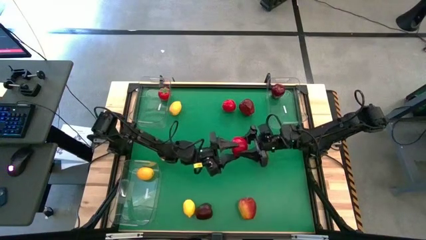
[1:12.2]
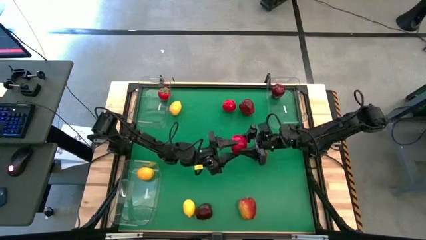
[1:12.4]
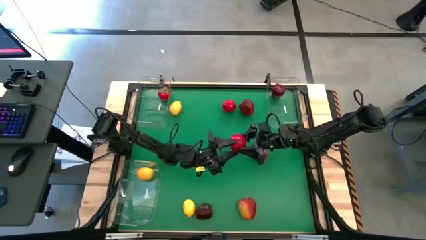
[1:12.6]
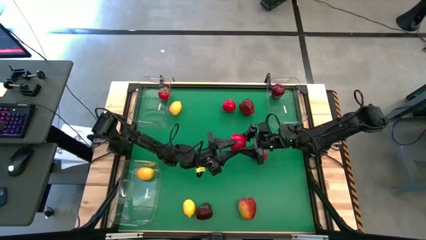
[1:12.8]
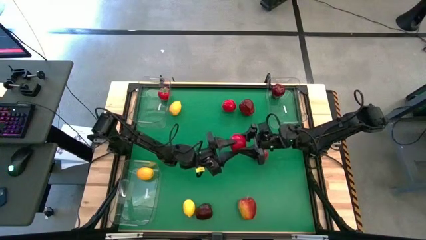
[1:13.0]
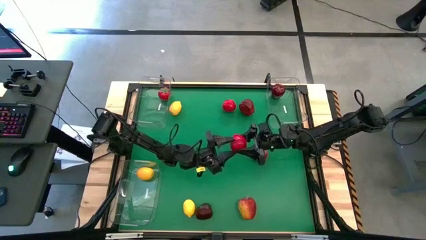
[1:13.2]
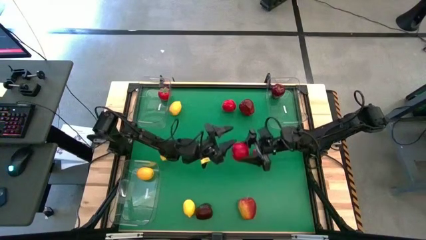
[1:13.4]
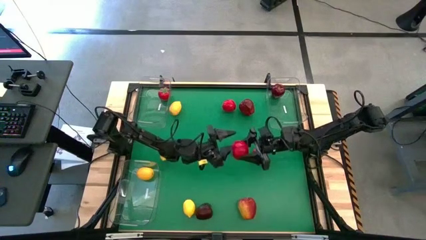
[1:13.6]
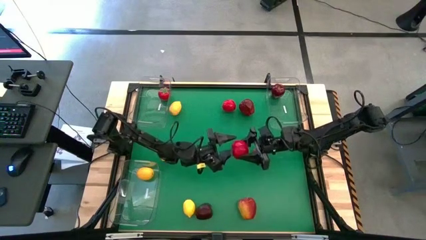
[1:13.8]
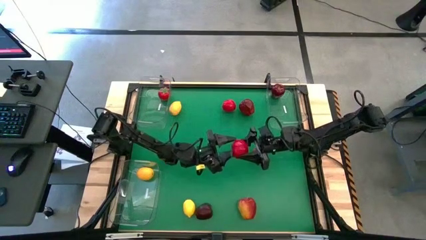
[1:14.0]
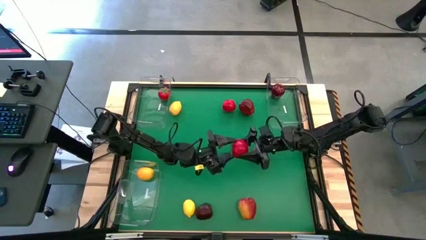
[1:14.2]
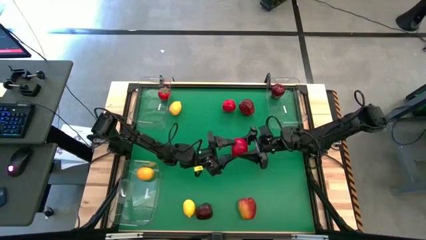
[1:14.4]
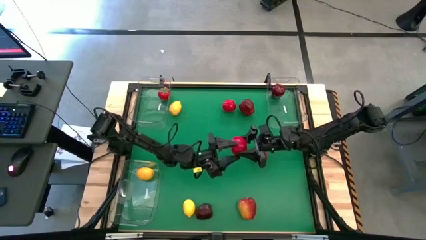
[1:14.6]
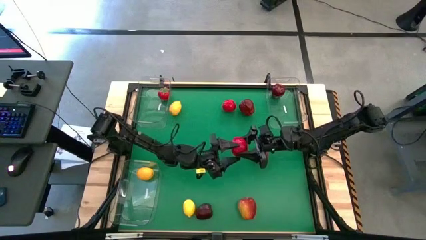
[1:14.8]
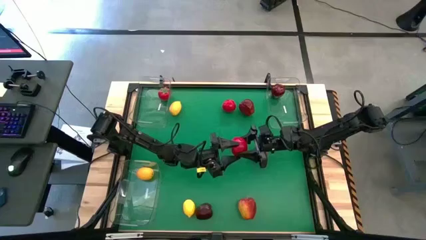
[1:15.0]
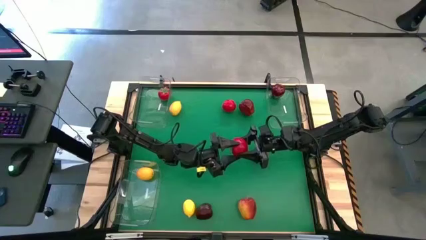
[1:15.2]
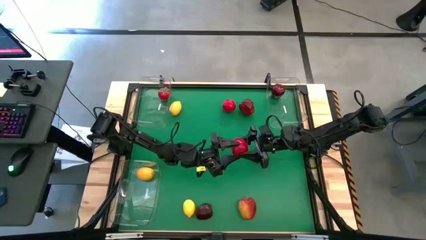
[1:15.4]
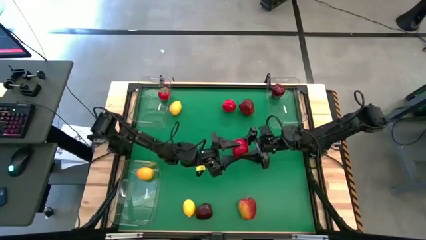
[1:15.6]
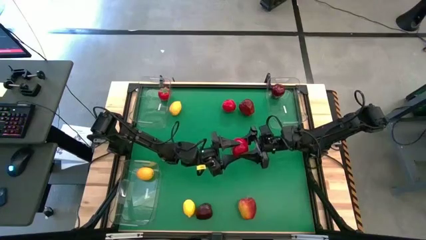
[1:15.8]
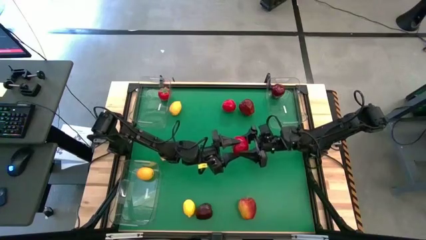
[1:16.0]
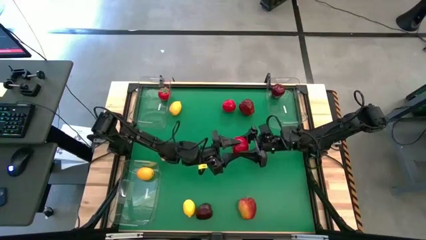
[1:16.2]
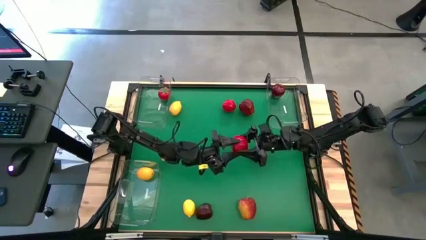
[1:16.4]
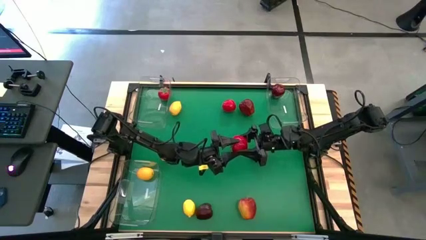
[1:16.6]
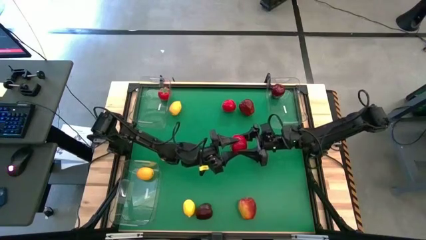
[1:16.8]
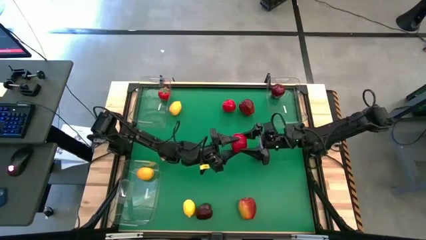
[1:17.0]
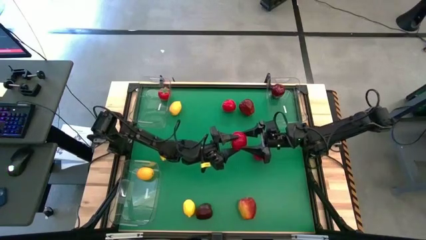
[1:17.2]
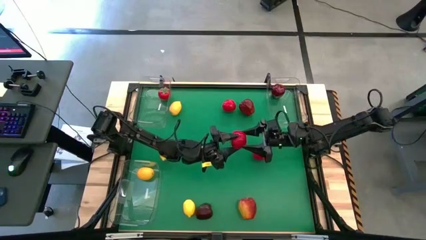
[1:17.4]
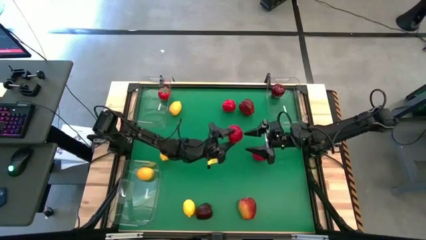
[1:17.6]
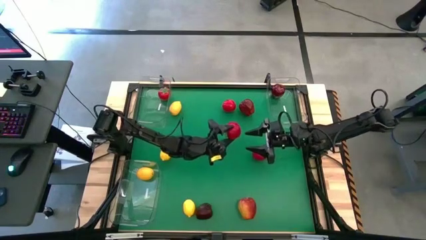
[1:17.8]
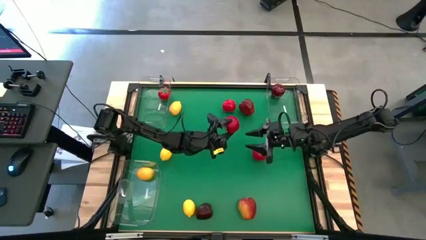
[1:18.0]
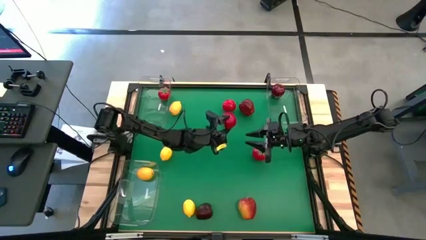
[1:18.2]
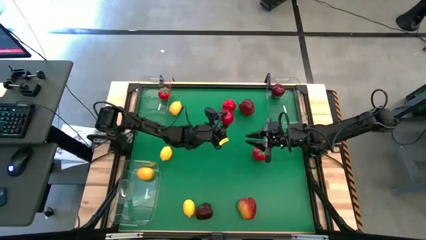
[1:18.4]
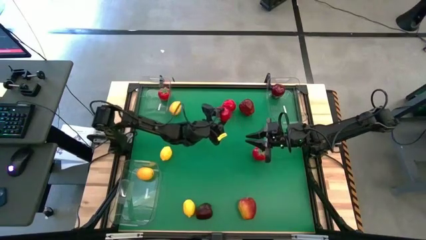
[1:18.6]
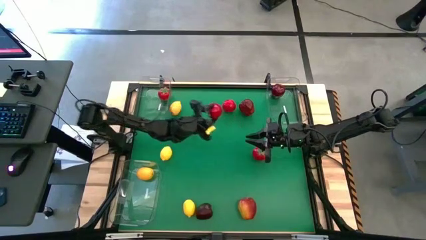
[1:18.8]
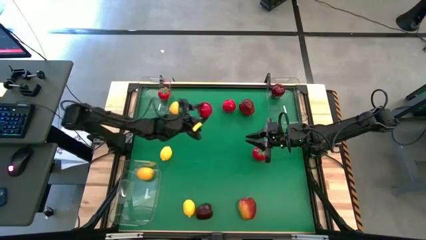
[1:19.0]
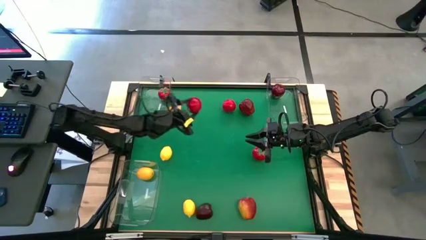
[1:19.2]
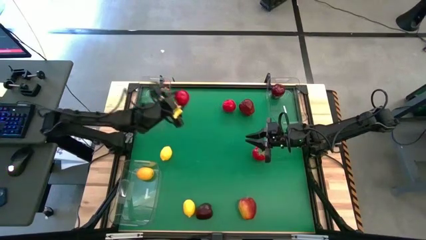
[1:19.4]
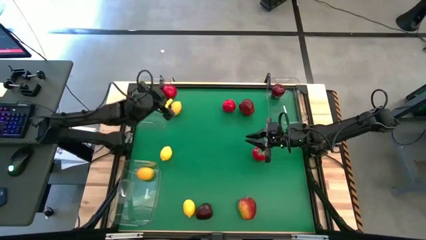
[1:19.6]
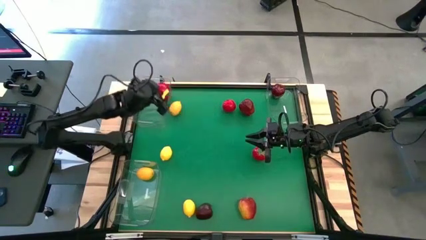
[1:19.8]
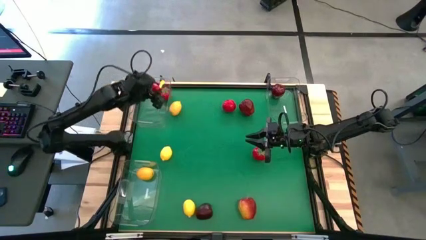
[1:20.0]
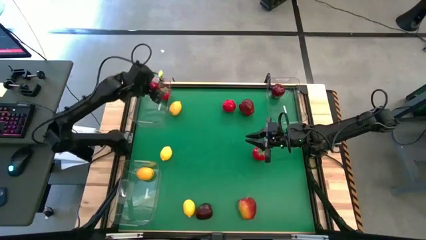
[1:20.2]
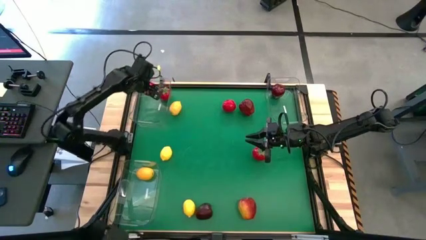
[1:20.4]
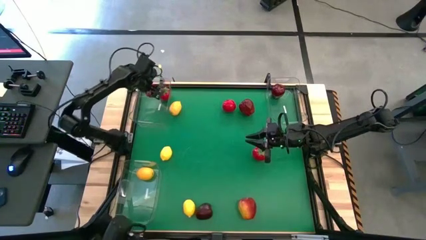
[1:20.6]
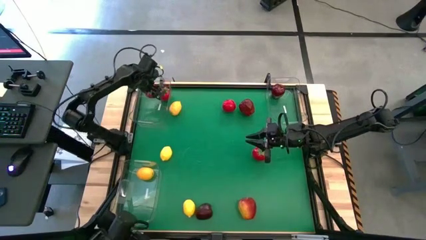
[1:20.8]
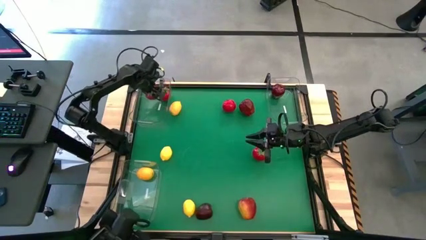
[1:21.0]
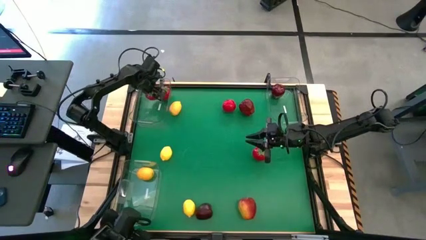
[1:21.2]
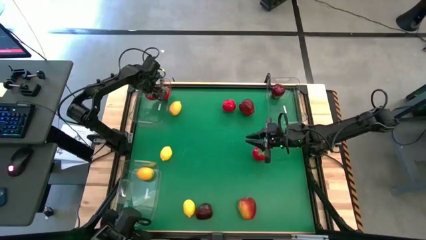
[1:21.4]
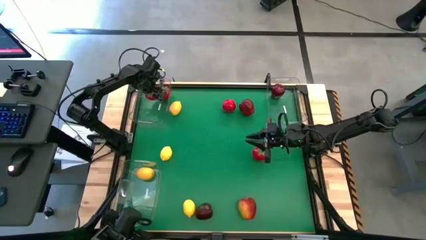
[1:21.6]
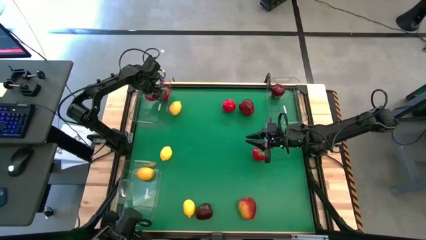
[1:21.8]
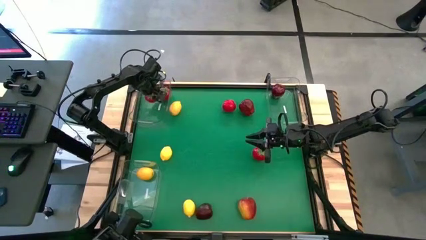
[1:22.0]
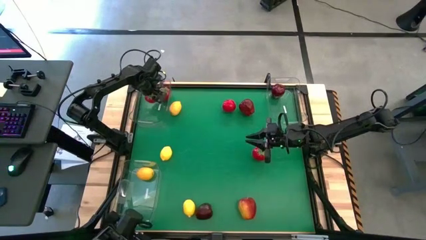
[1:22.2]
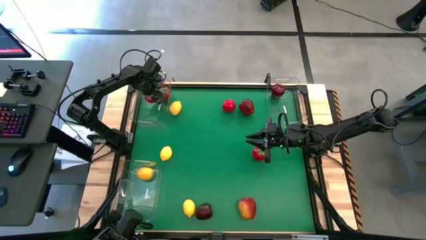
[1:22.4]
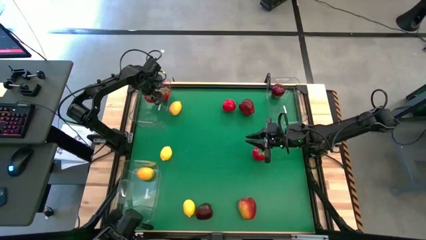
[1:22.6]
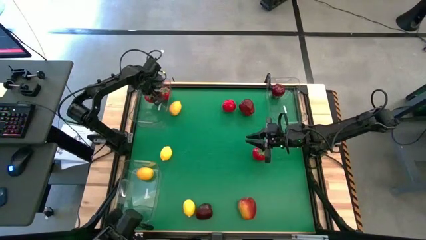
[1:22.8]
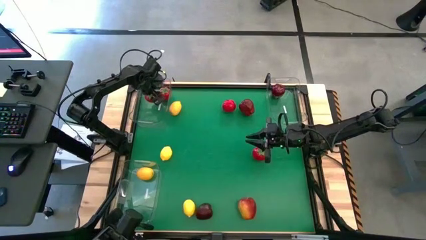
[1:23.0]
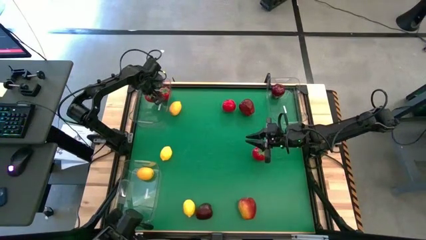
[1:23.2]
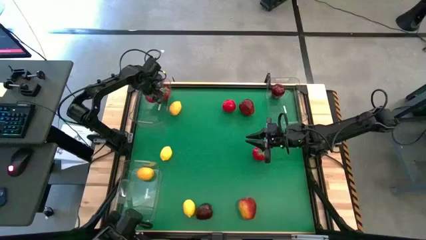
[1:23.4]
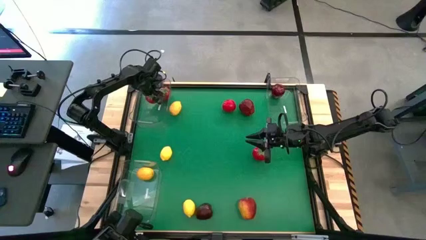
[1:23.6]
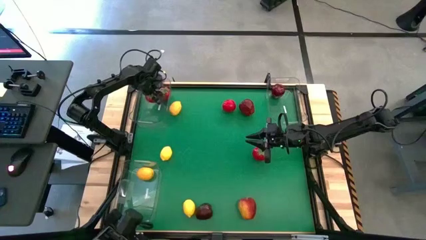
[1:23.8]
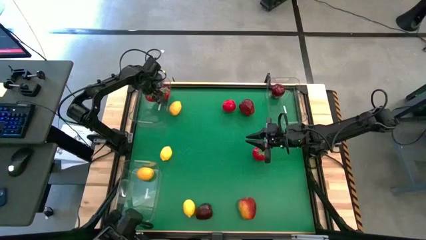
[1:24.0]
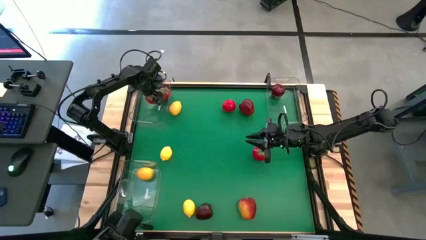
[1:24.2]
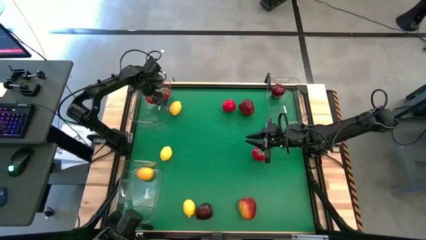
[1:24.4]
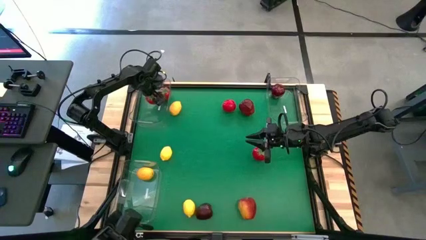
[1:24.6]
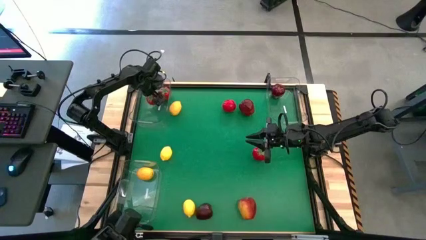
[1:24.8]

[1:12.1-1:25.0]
Task: Sort produce into baskets
Put the tomato into the top left bin

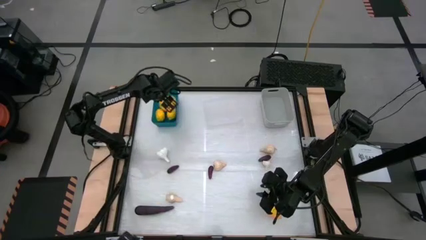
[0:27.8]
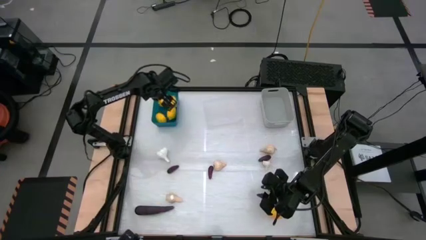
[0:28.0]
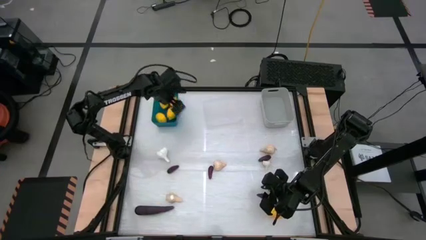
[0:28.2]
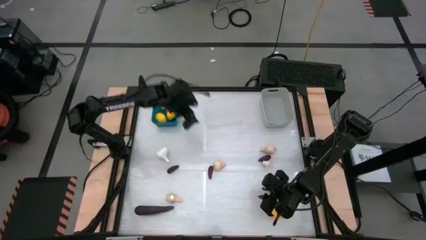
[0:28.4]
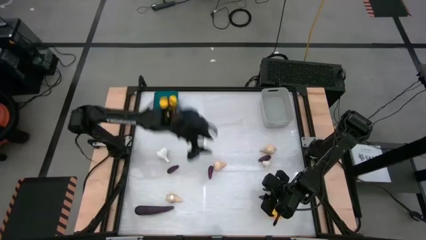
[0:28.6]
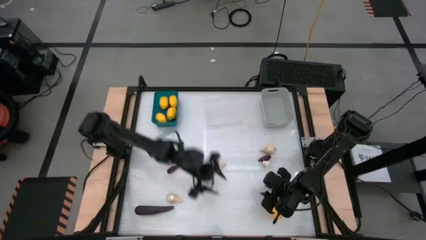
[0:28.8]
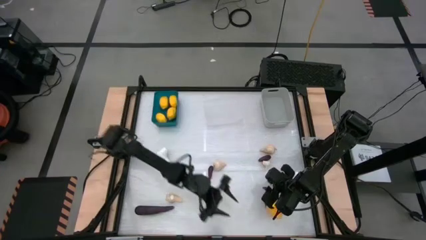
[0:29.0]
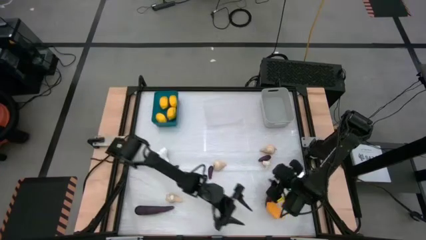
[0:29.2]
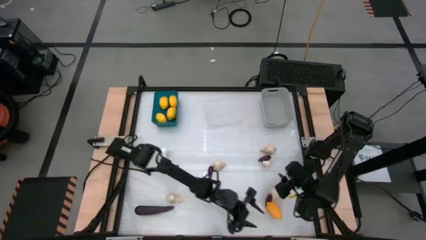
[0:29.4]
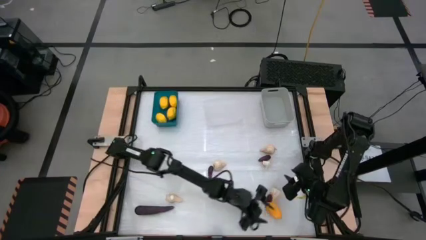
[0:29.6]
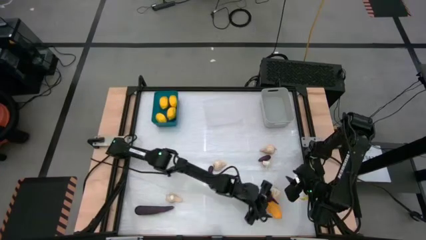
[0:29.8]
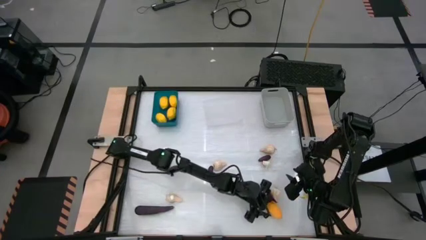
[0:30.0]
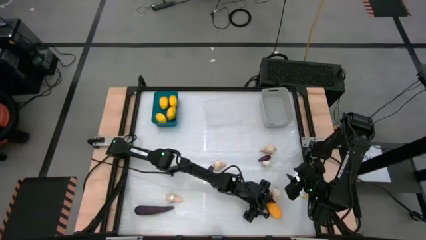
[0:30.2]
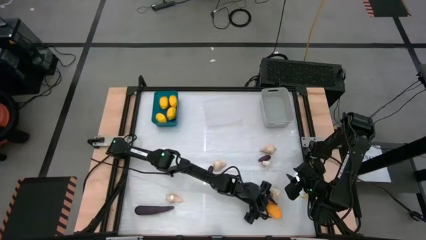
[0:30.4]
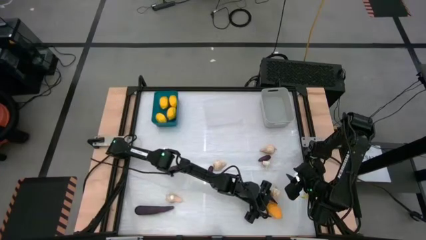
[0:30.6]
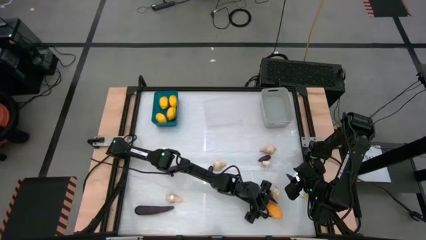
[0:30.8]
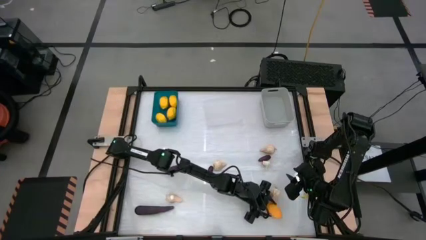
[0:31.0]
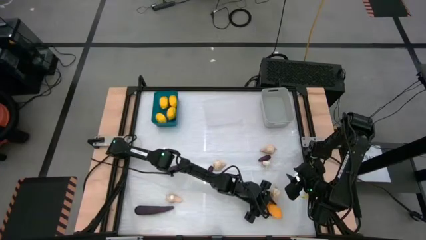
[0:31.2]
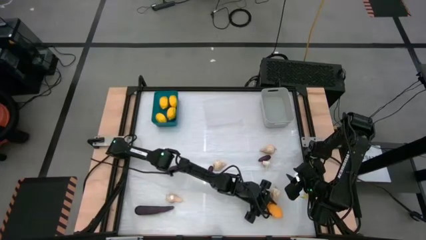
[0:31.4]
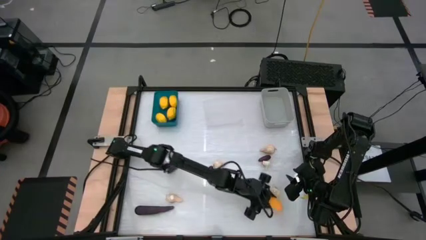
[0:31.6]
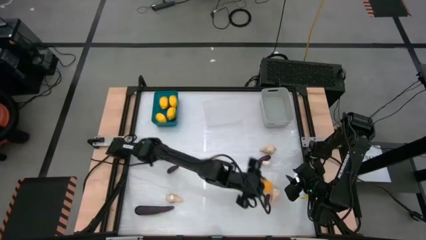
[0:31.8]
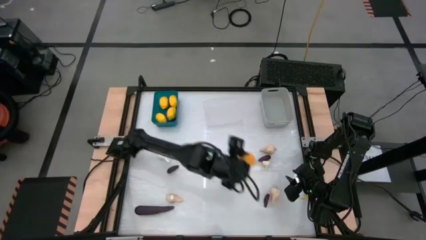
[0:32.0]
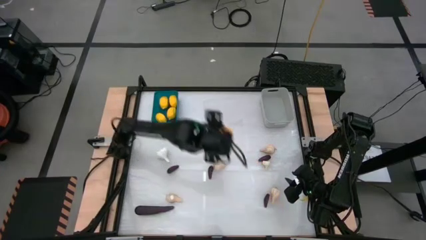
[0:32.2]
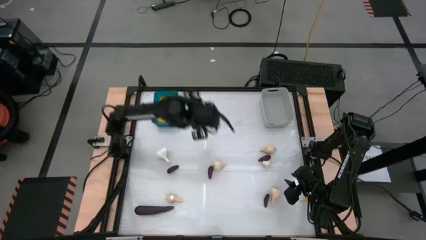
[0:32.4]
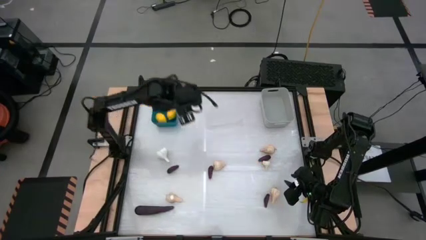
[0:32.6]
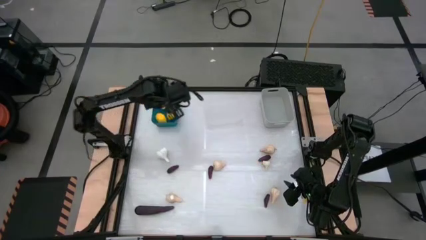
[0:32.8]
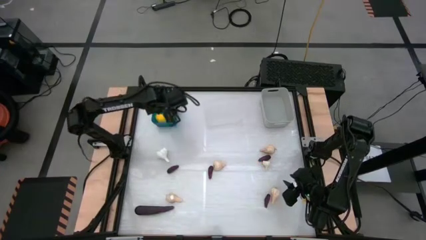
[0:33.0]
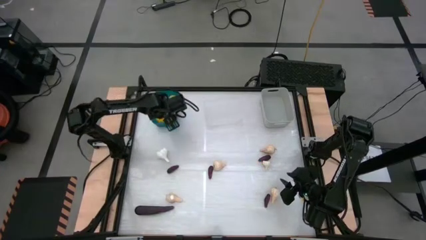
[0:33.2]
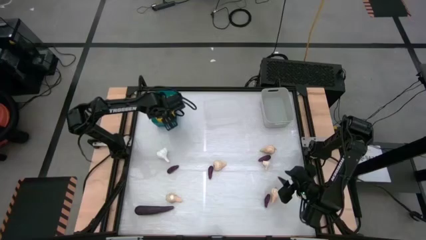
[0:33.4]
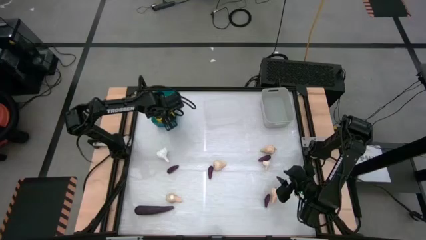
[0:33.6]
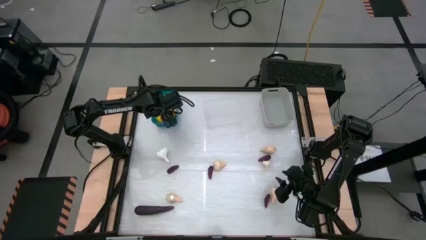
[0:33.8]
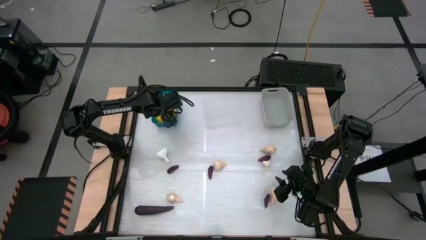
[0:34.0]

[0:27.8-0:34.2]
Task: Sort produce into baskets
Put the lemon into the blue bin
